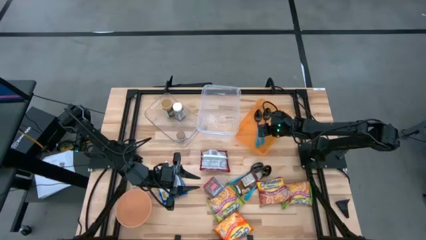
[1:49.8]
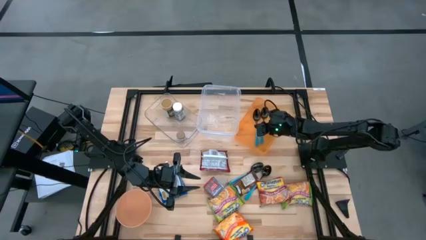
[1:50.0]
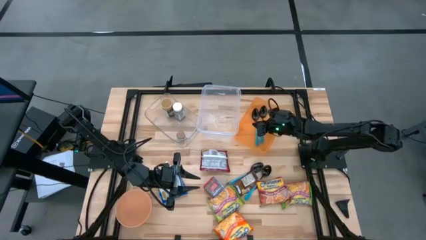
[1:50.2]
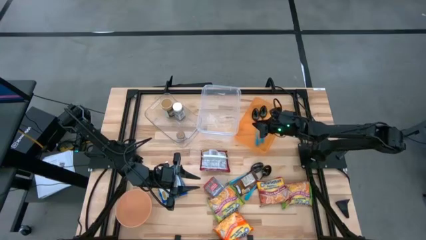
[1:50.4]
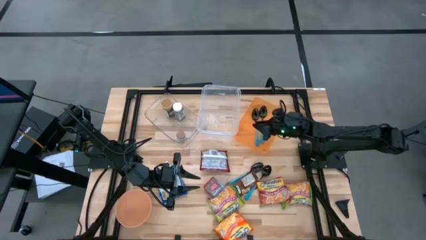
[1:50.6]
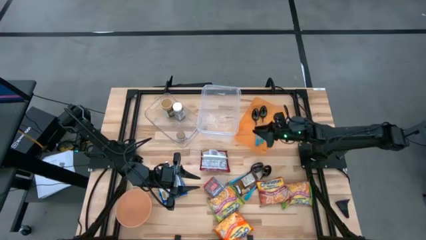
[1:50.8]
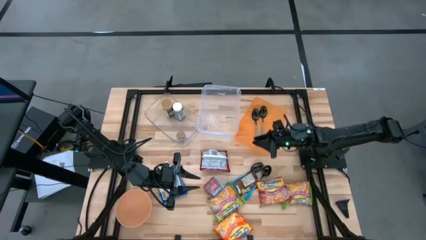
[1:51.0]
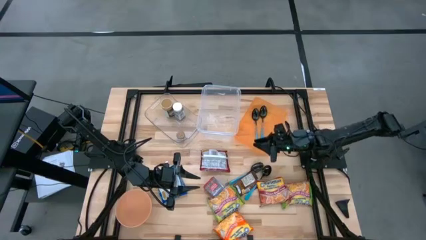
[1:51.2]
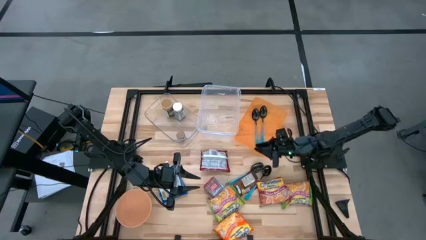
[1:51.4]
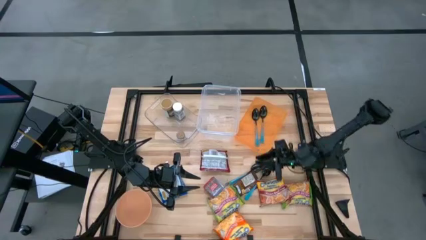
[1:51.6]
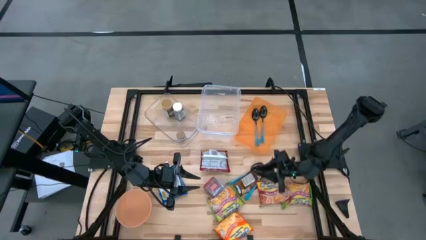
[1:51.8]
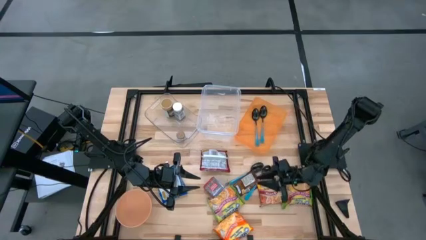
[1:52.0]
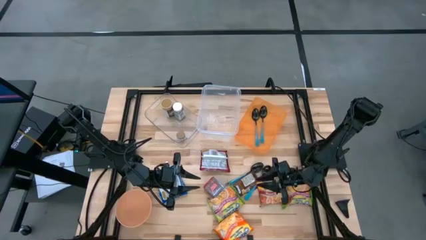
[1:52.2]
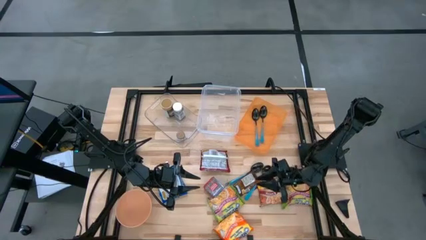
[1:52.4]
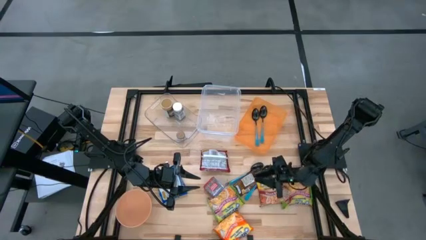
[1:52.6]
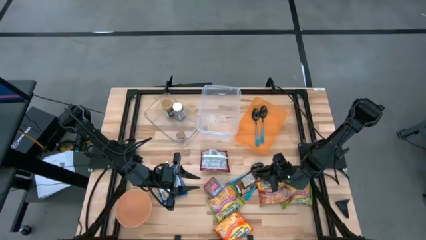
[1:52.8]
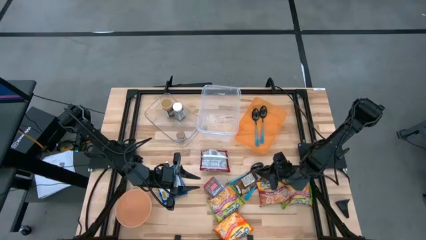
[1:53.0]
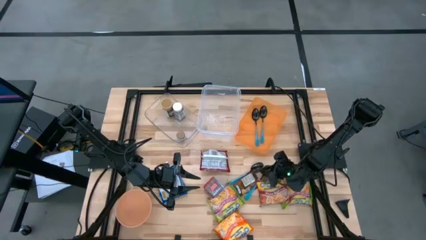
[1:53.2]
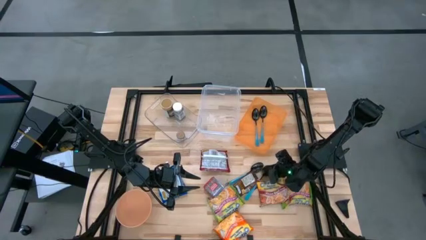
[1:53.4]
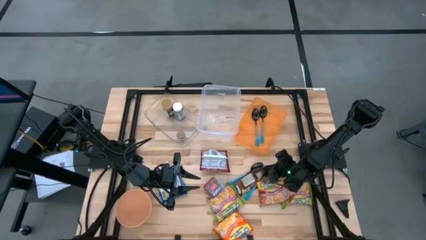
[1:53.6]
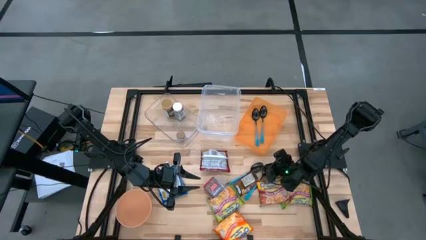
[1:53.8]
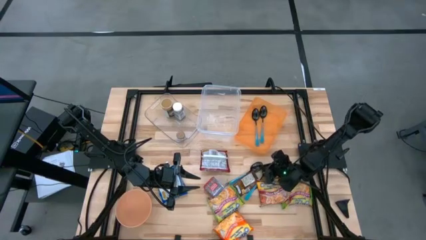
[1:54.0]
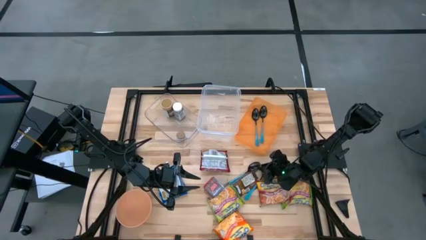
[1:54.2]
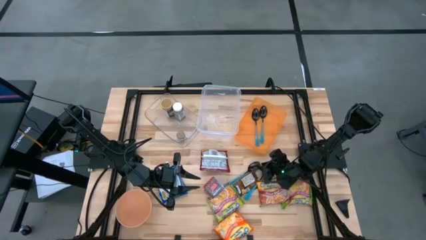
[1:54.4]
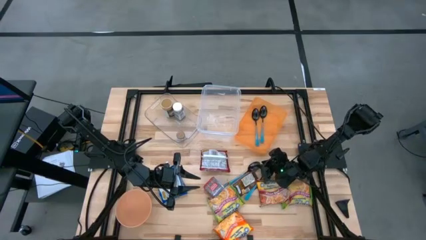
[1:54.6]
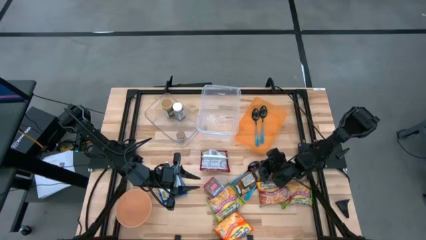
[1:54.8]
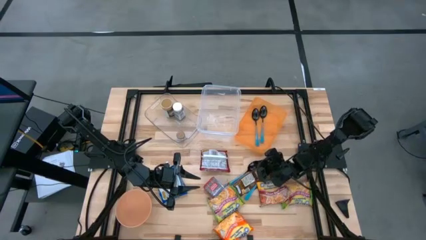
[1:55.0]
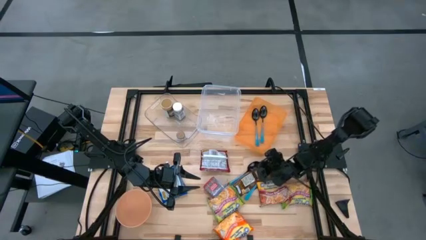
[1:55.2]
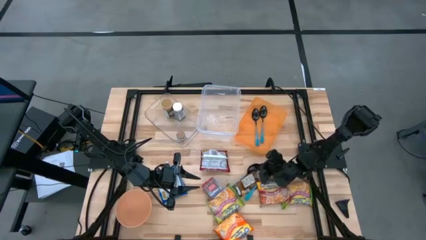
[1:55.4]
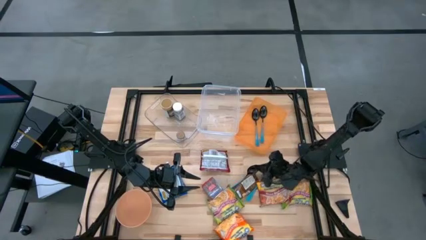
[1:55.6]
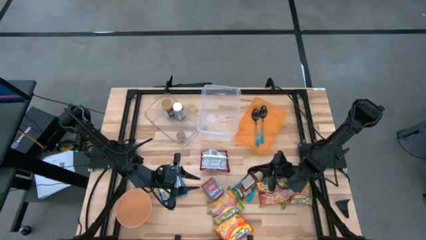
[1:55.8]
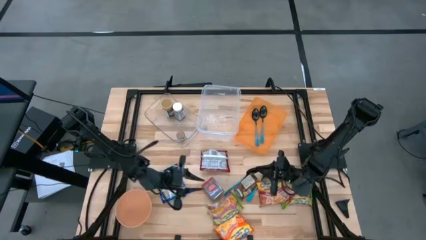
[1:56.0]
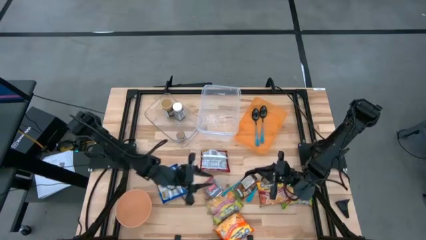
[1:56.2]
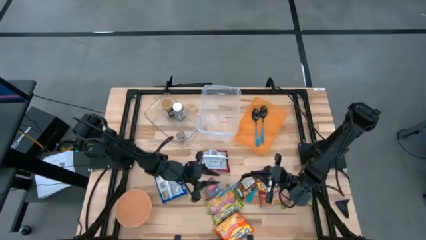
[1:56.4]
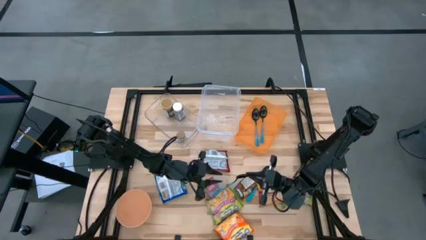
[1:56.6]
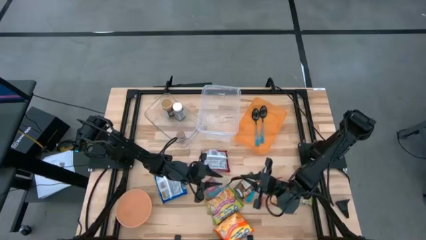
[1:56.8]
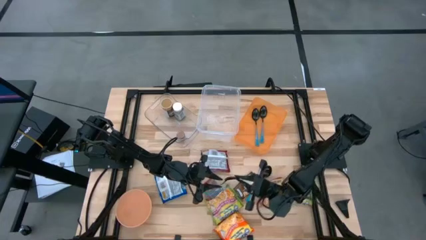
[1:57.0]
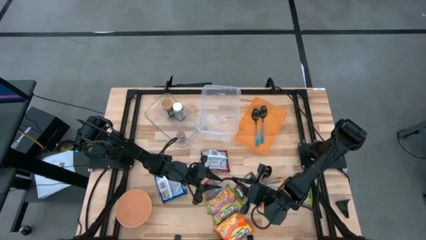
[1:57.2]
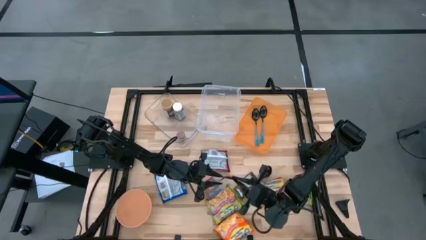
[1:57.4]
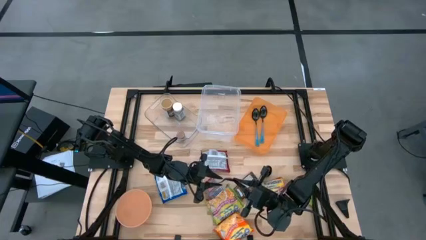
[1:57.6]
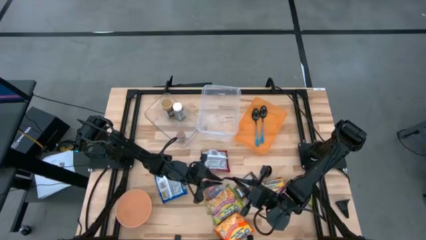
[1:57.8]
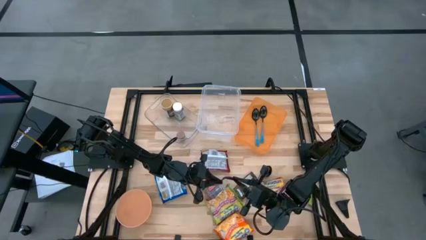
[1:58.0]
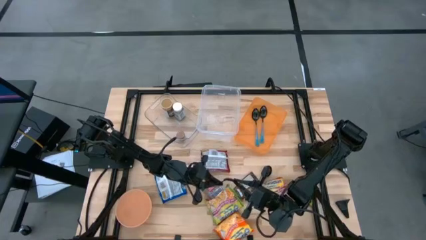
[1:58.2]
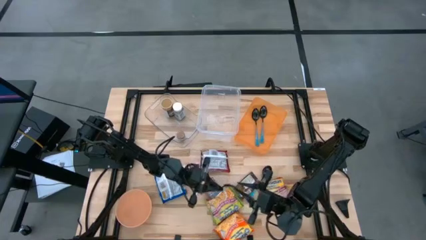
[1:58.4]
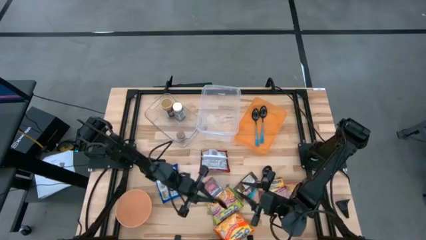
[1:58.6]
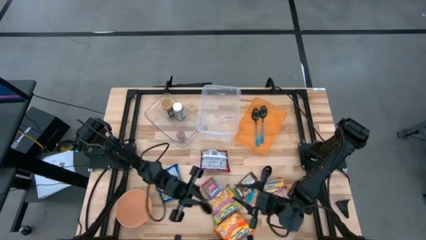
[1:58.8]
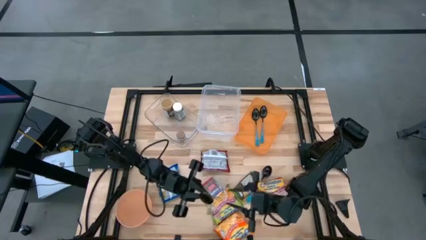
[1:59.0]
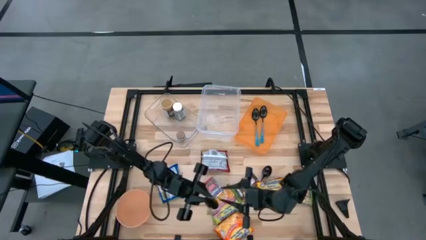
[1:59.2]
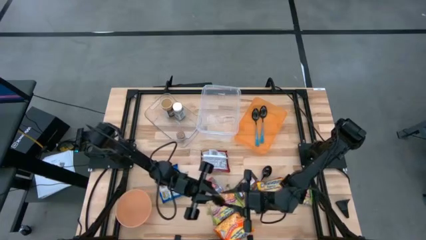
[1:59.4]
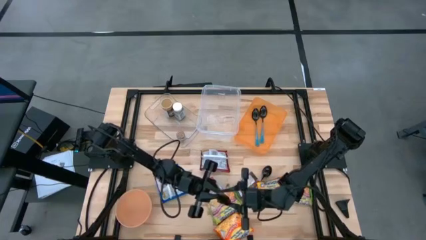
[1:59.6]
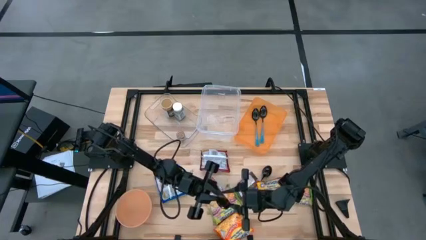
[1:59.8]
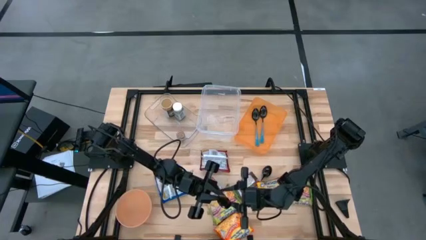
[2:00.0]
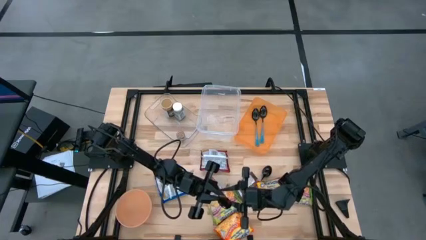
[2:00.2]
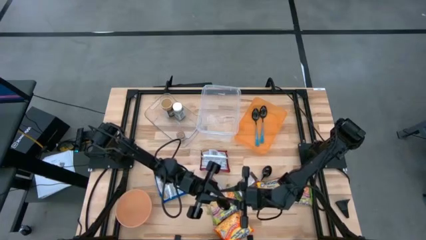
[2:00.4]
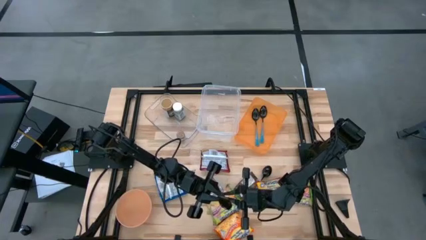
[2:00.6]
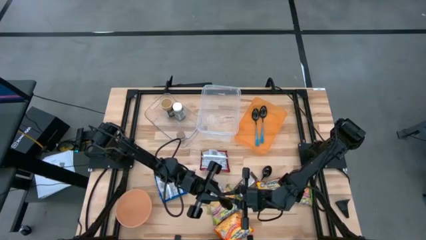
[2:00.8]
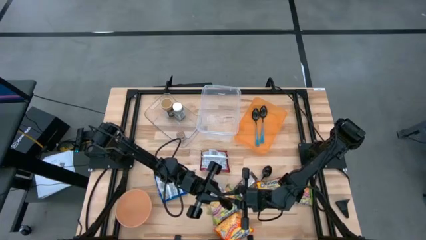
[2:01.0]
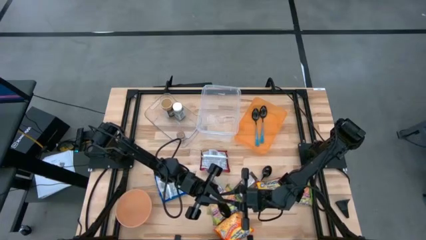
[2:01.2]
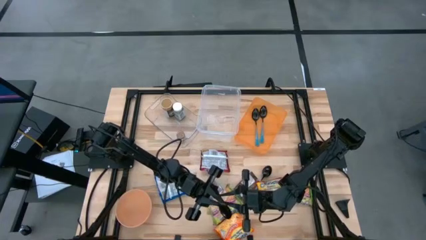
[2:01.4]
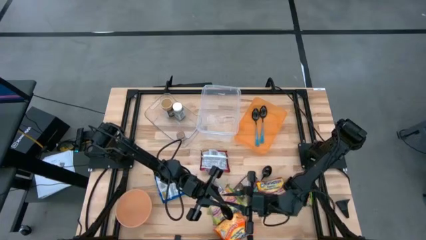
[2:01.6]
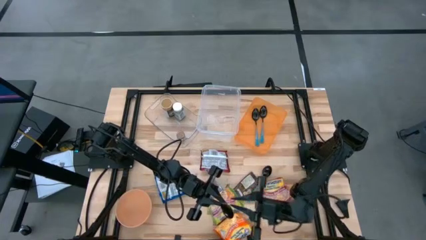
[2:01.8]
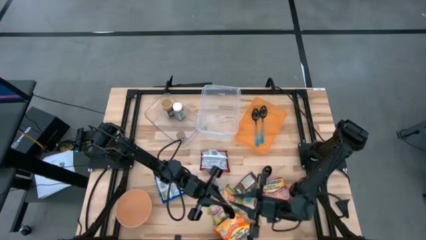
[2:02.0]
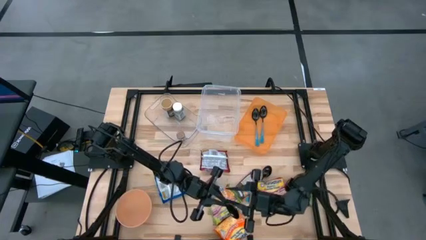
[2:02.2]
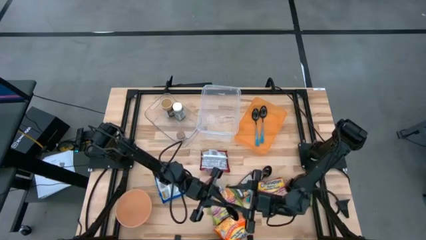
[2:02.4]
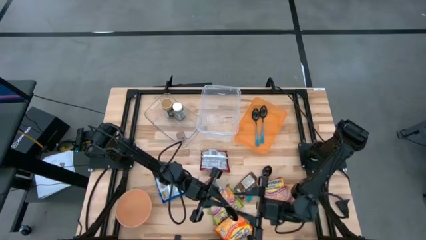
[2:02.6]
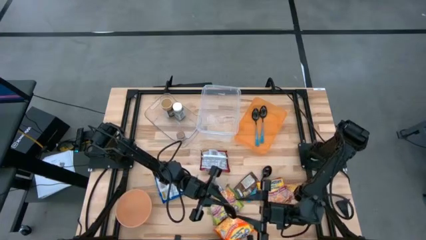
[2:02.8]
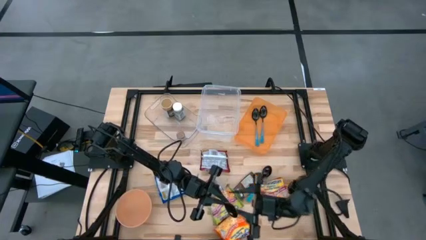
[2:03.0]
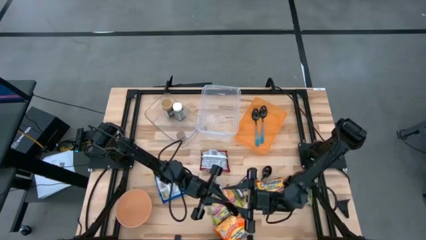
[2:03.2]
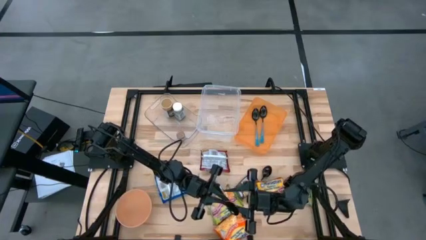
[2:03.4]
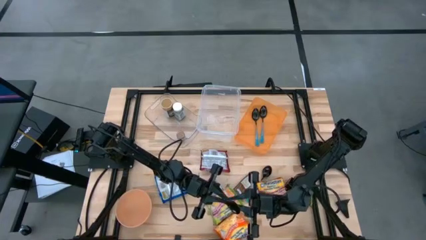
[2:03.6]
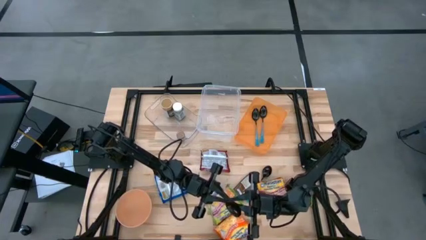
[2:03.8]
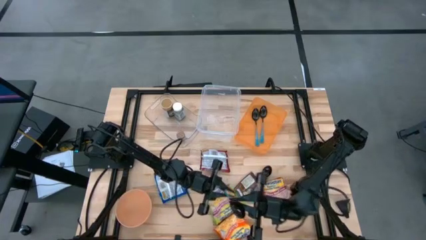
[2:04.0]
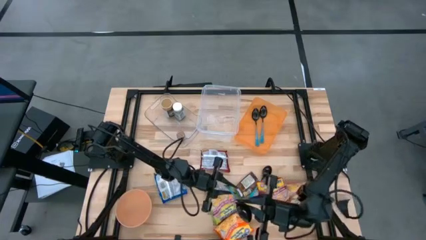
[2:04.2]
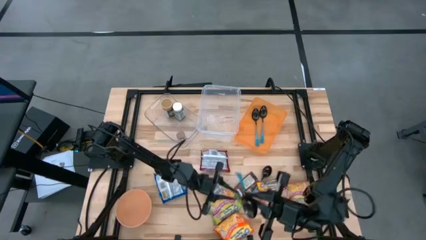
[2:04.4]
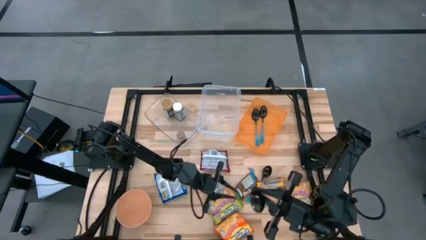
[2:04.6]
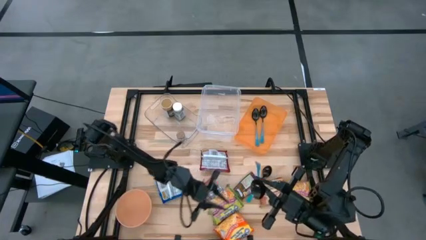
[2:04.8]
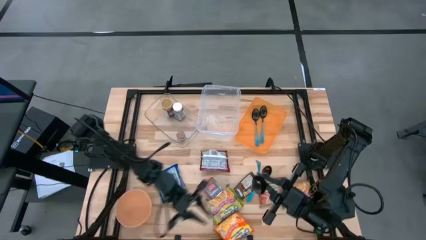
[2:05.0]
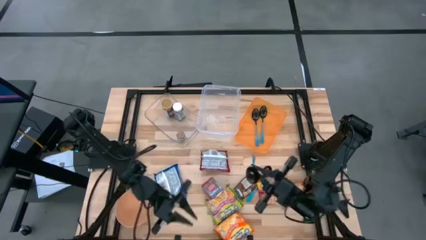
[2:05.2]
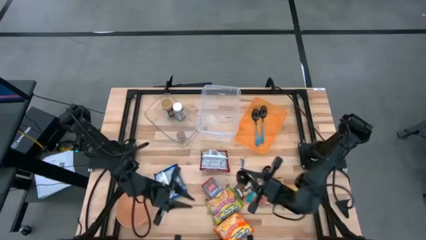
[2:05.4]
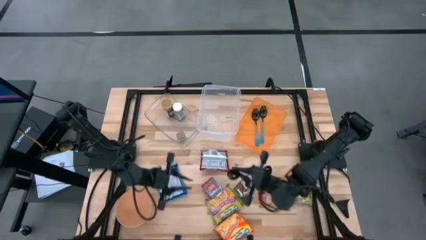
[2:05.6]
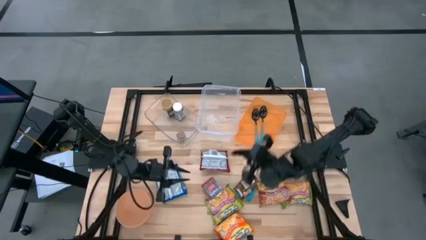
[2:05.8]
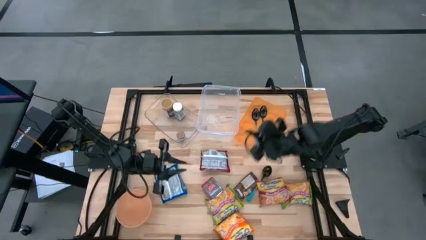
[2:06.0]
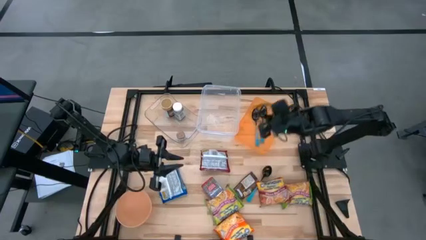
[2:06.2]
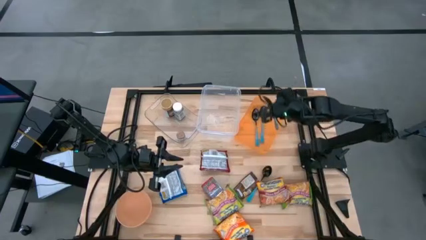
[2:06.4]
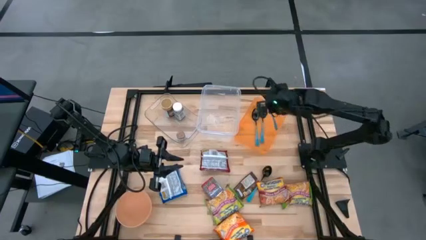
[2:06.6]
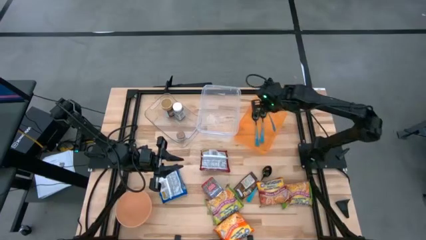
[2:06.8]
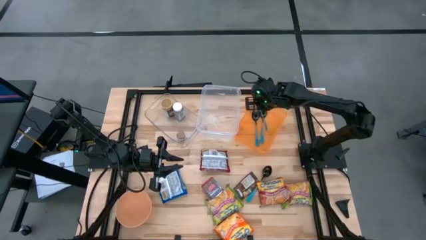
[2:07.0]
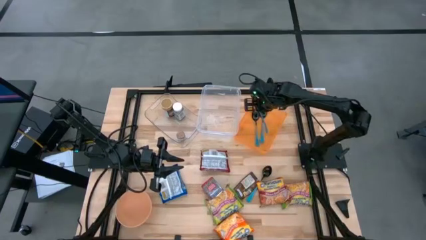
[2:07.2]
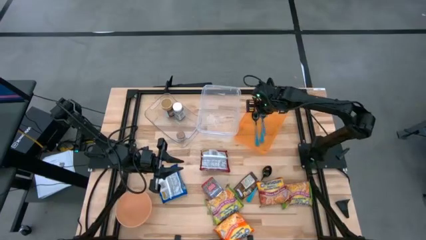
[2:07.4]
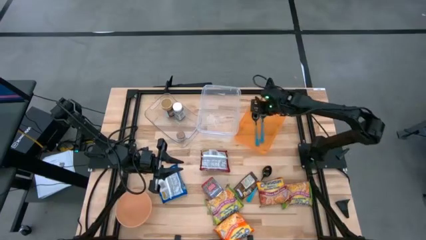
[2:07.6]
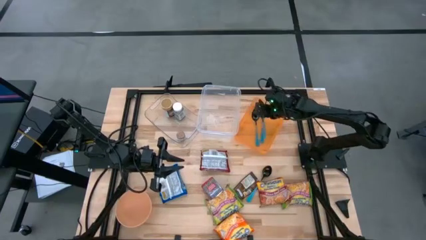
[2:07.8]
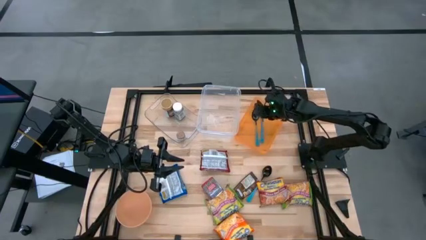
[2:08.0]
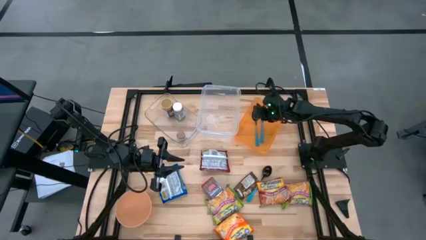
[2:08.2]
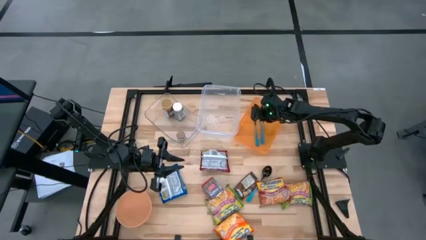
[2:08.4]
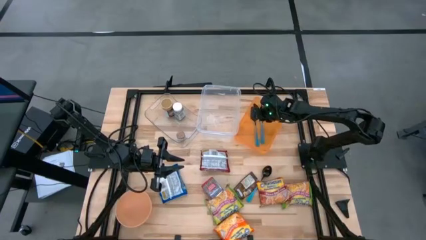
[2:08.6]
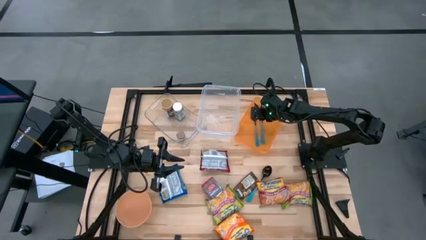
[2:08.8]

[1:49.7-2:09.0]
Task: Pick & Place Food Item
Put the blue spoon into the orange bin
